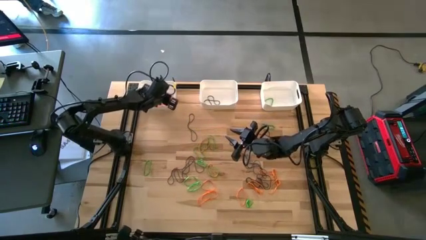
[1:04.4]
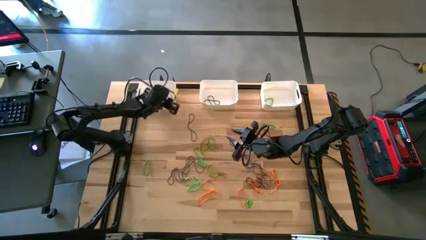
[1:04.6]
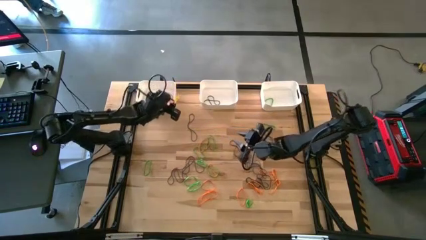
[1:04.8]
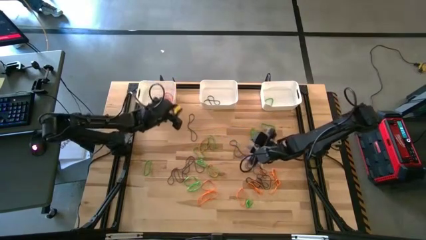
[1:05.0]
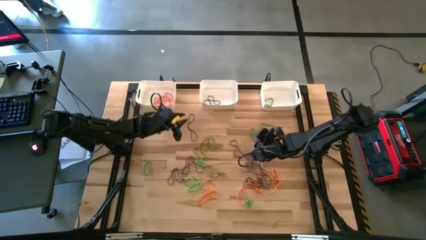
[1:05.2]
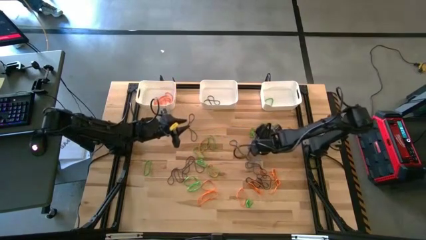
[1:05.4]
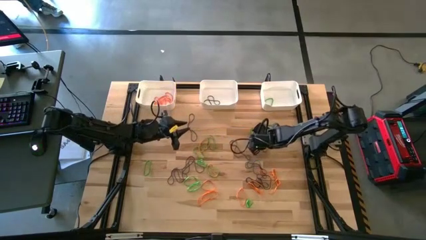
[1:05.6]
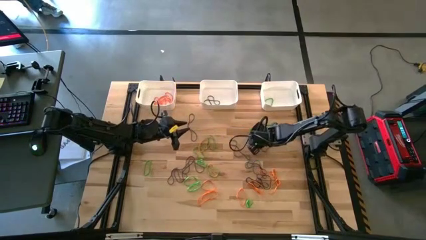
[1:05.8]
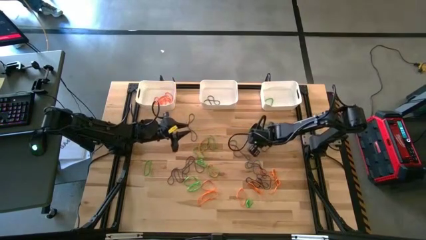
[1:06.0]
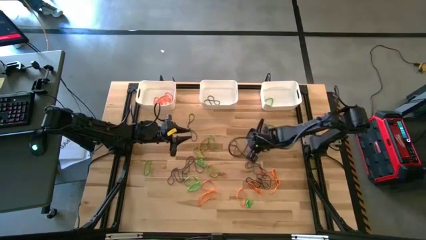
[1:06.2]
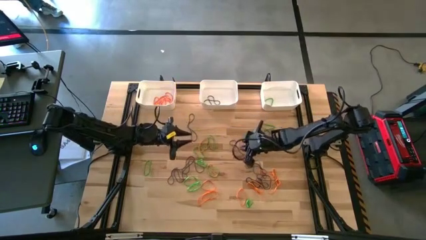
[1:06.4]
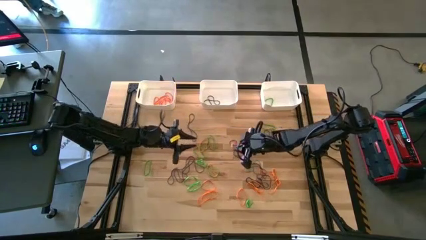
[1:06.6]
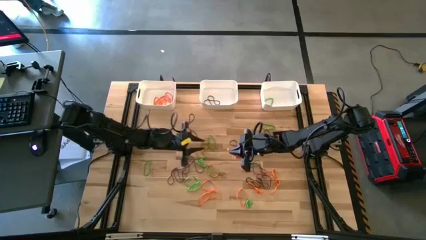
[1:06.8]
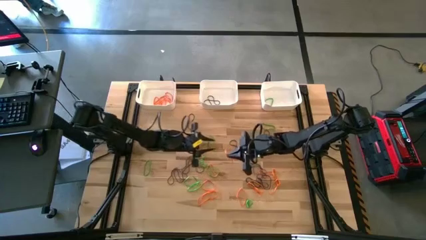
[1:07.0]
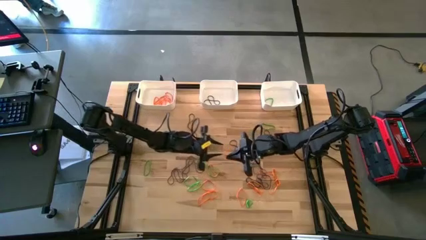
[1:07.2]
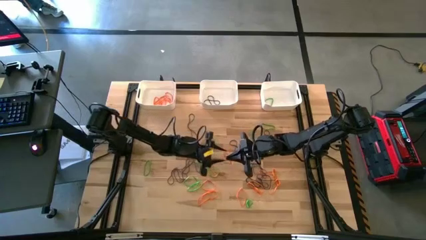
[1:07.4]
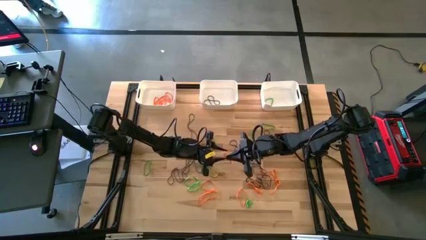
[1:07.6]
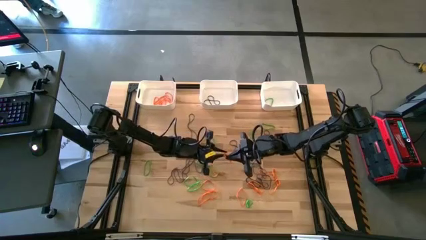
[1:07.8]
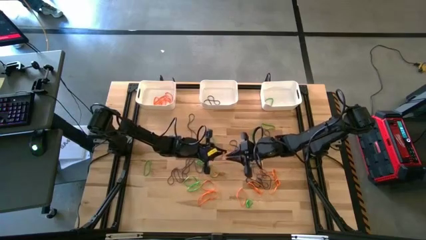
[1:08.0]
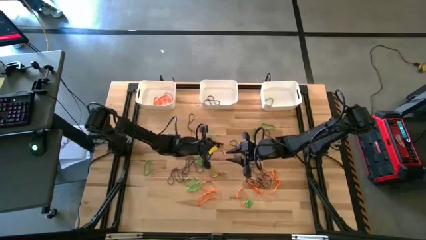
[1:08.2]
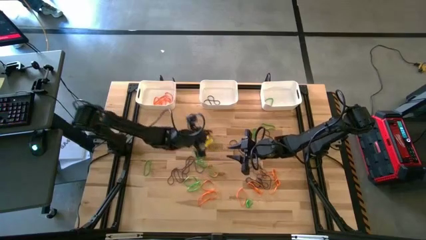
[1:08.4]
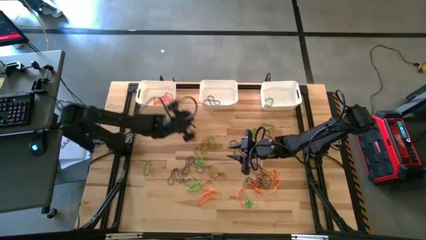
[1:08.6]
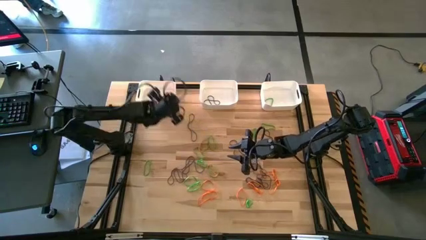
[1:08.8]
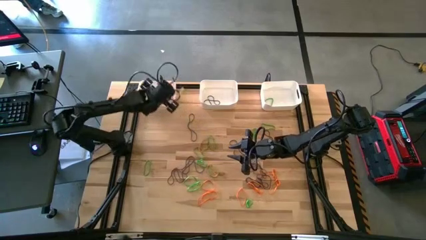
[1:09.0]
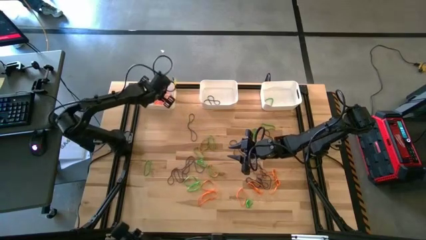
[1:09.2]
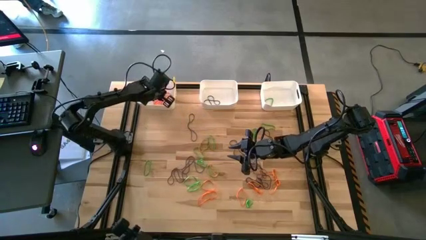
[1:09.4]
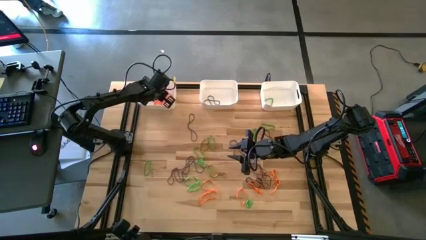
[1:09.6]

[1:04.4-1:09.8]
Task: Sort rubber bands into baskets
Put the orange rubber band into the left white bin

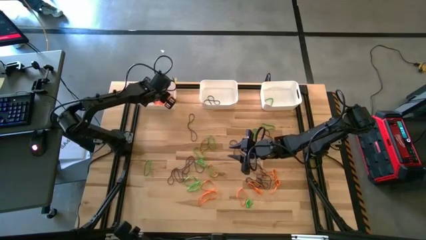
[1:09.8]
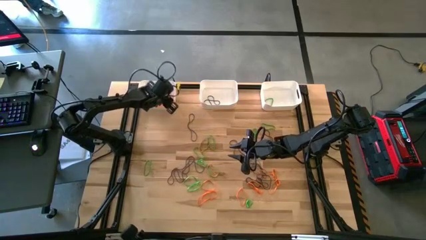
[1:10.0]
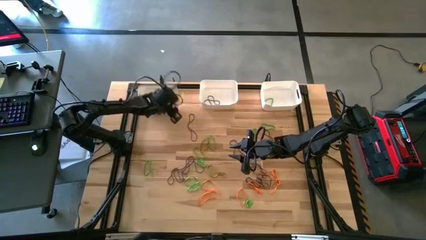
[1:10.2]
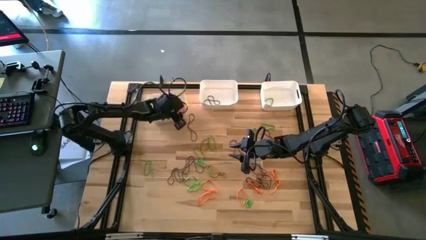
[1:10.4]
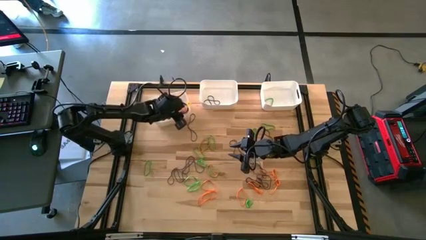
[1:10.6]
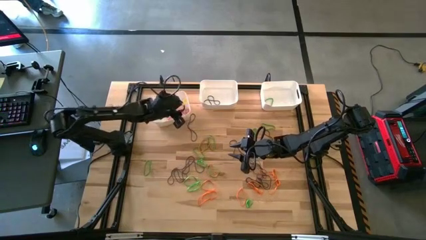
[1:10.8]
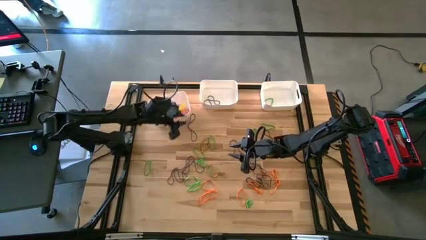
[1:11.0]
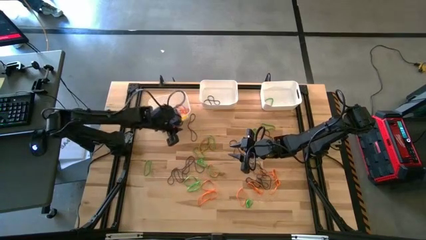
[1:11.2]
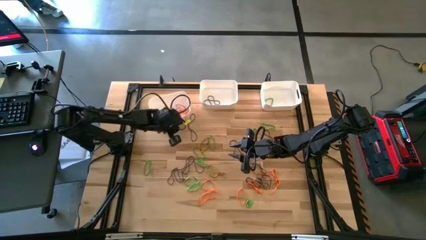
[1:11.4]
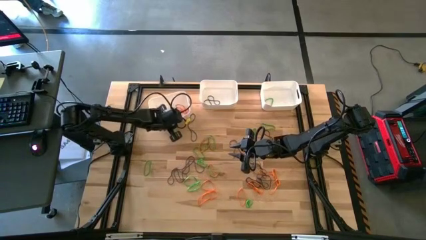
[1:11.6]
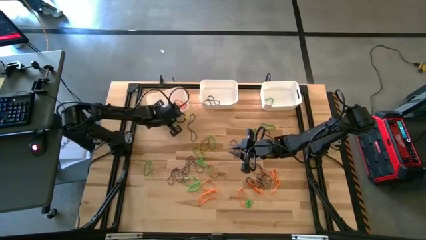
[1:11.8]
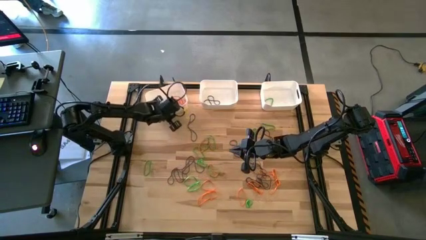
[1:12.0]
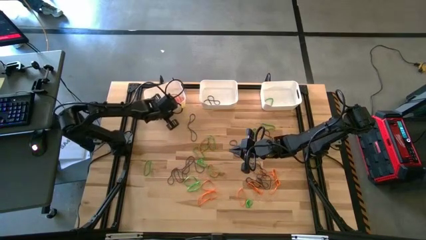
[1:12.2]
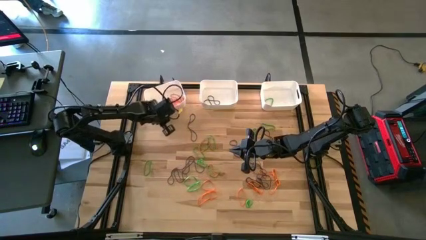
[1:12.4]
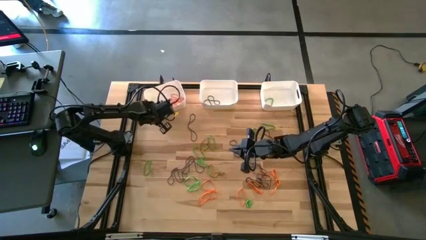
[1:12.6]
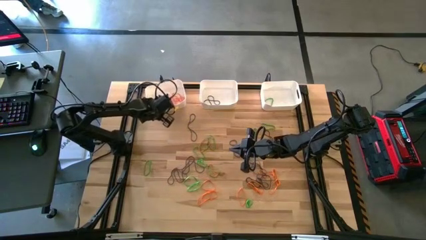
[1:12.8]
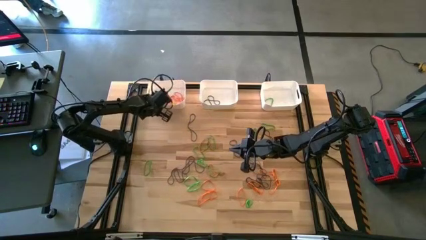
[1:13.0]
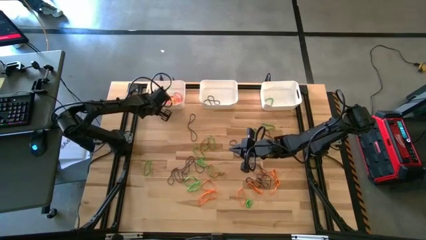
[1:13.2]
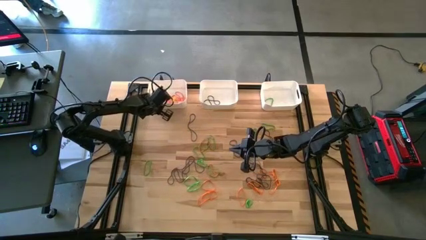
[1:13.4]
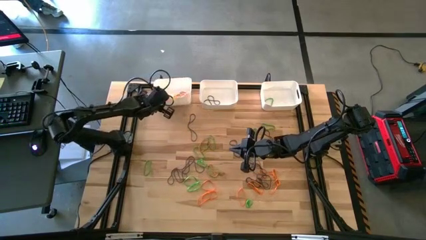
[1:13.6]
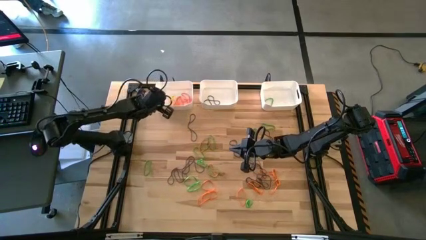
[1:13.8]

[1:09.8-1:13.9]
Adjust the white bin

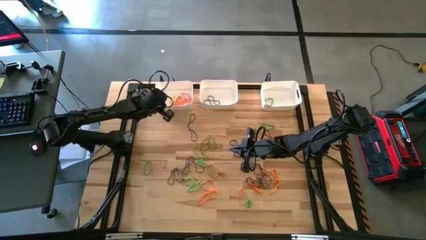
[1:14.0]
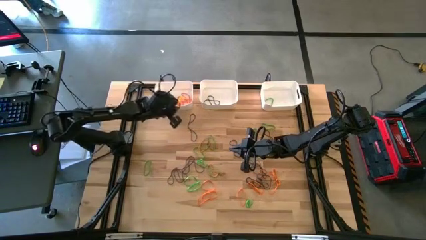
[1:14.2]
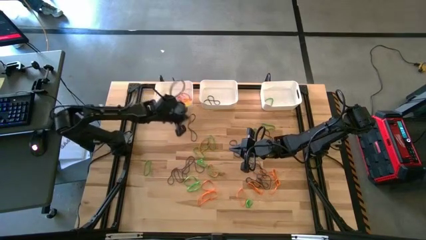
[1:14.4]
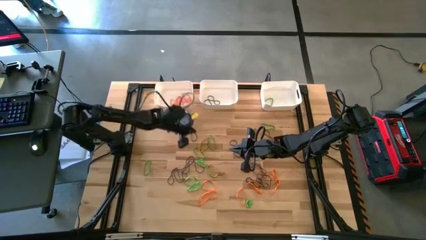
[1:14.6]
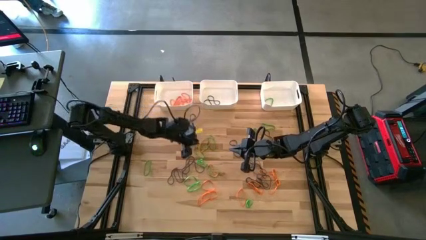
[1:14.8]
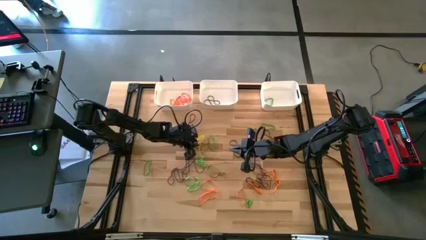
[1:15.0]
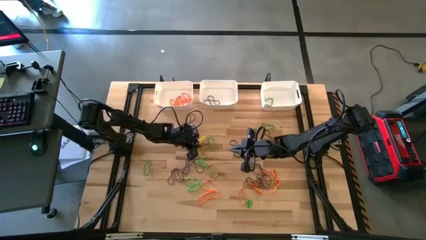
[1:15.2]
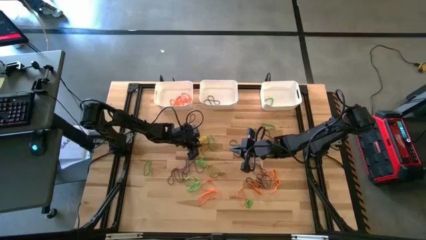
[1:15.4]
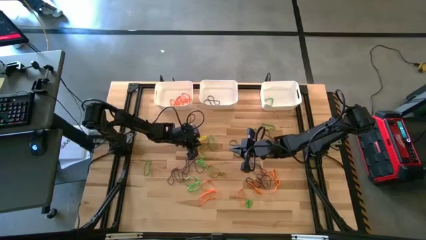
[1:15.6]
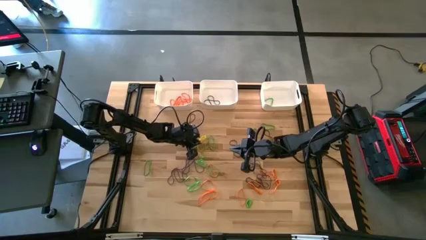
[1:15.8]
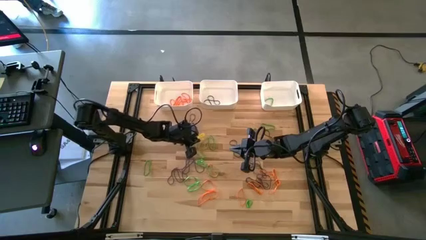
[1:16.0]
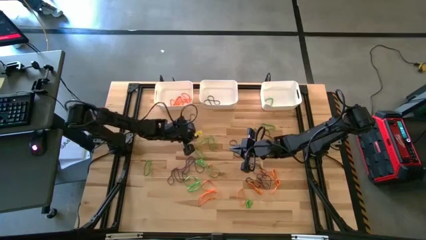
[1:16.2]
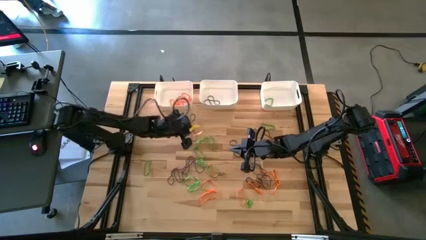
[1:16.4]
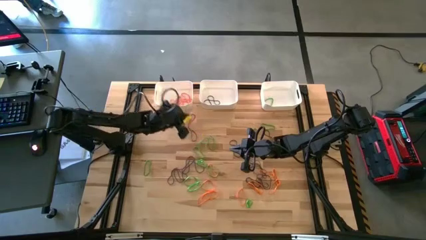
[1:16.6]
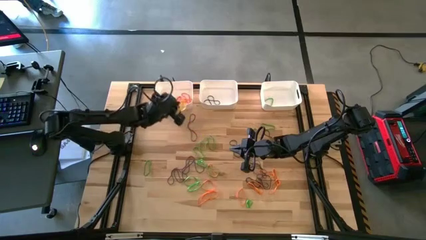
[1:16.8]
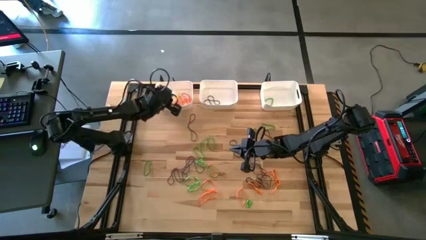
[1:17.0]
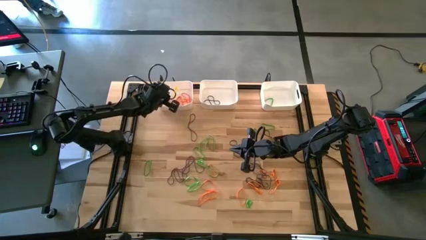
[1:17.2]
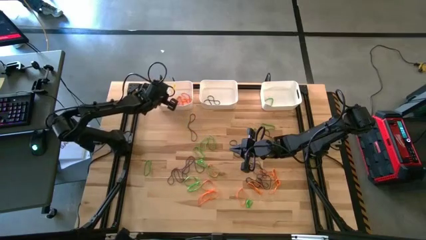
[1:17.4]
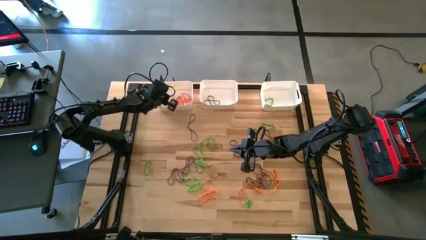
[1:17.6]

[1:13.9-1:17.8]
Put the orange rubber band into the left white bin

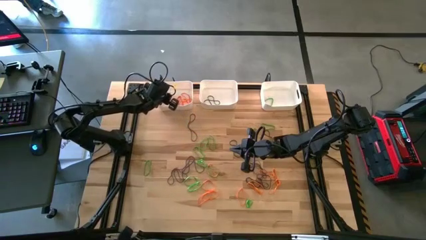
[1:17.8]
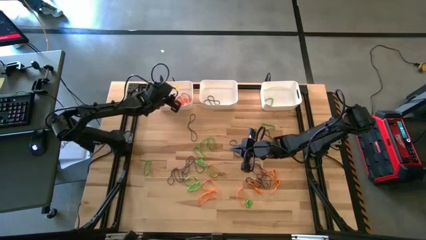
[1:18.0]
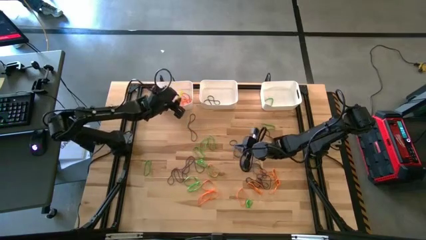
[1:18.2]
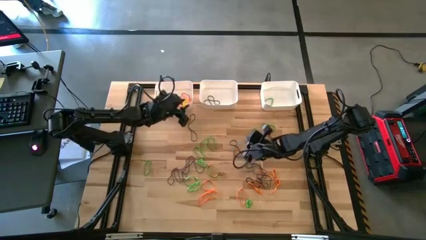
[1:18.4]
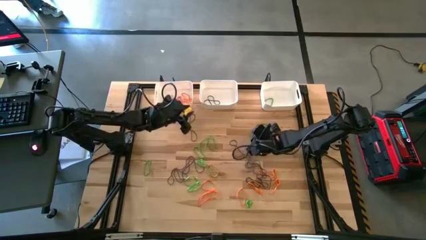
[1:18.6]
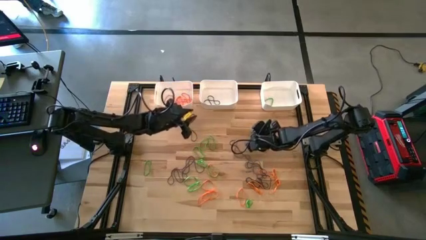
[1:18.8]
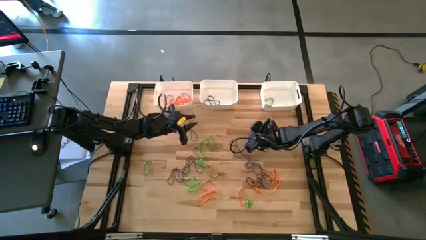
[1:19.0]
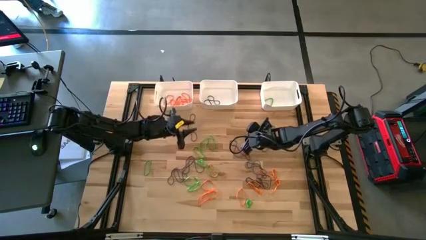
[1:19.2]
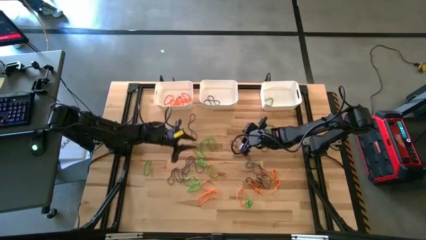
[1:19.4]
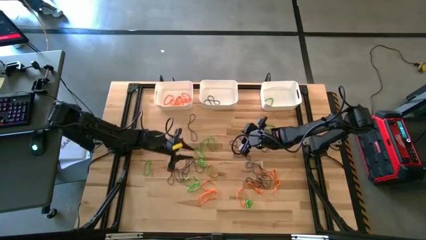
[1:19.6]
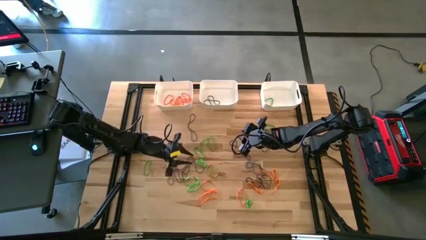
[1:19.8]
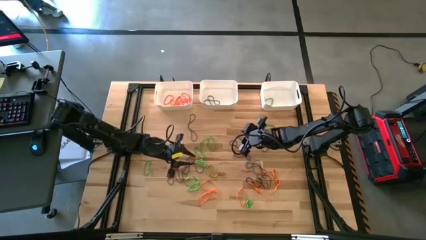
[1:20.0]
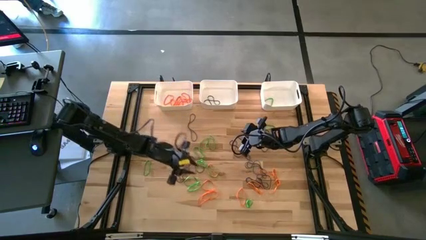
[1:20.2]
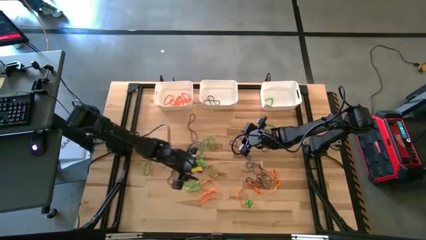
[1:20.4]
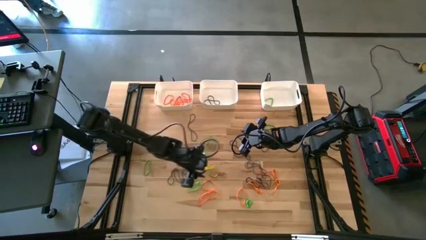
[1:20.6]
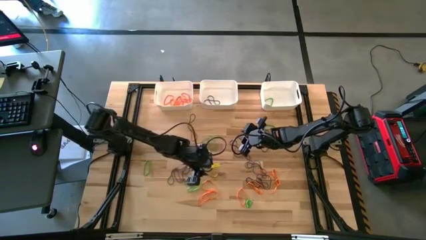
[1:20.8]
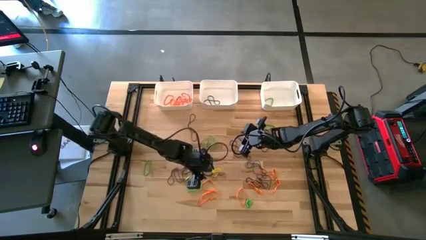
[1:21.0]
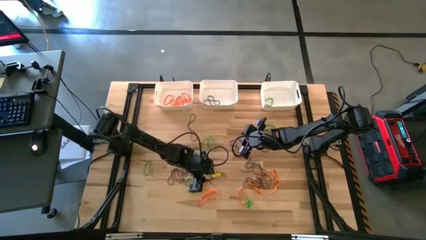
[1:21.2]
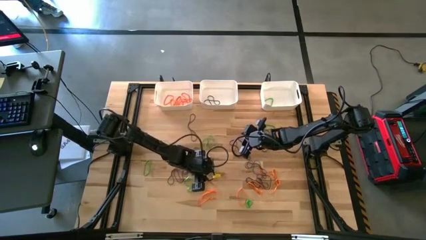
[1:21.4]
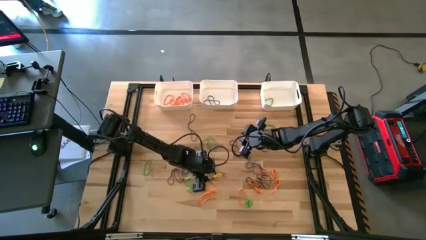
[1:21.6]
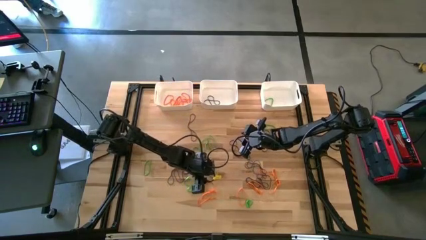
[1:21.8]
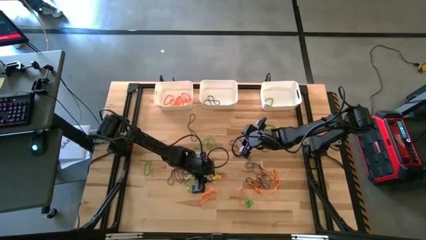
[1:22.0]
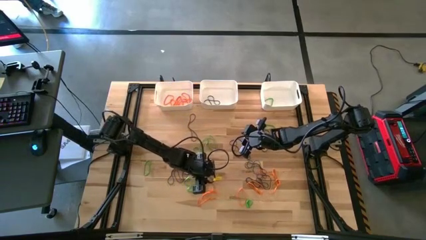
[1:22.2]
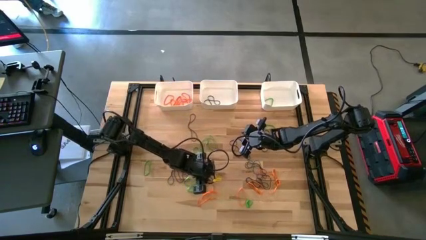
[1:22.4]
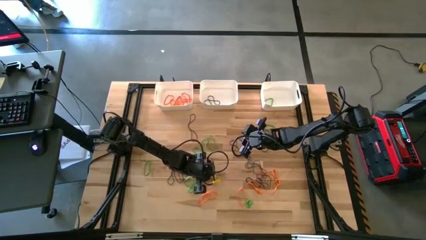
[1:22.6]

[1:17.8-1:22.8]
Put the orange rubber band into the left white bin
